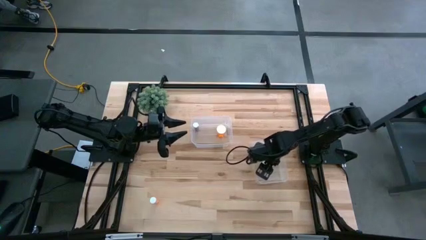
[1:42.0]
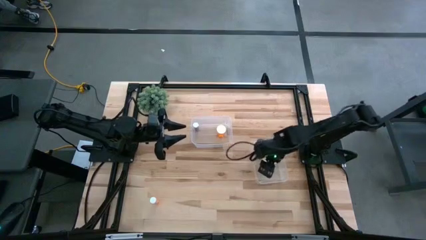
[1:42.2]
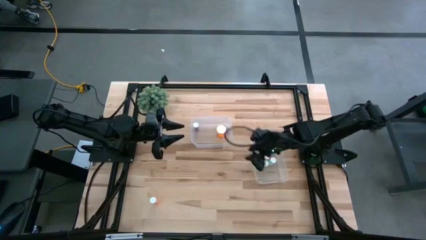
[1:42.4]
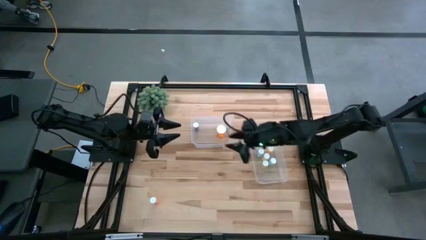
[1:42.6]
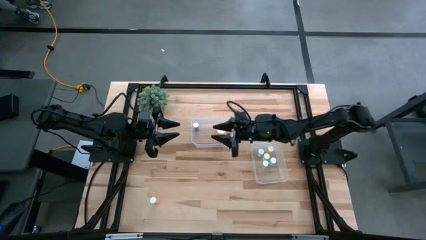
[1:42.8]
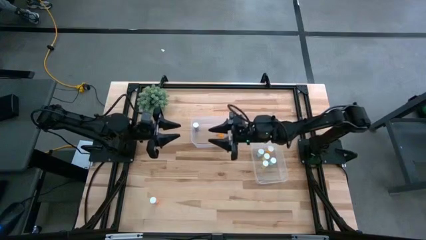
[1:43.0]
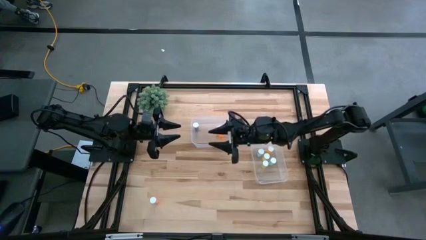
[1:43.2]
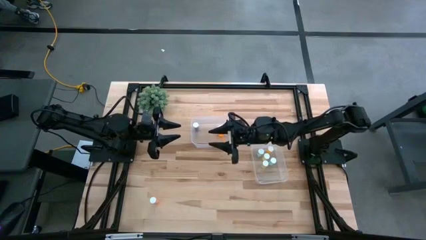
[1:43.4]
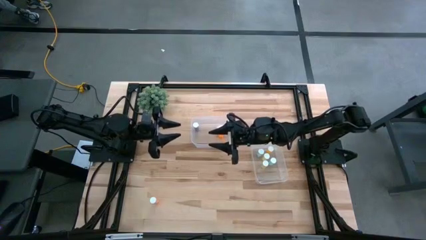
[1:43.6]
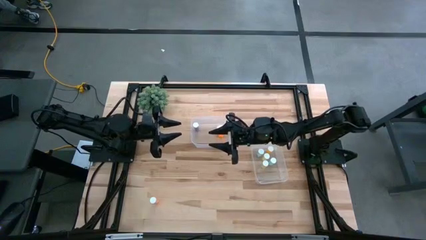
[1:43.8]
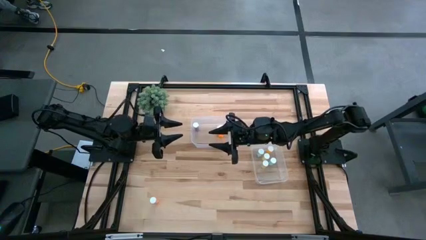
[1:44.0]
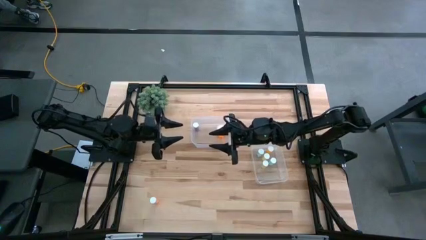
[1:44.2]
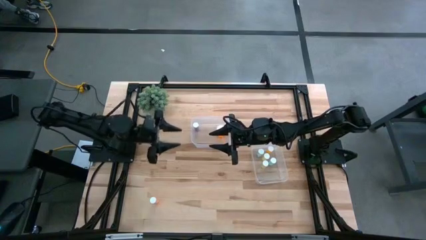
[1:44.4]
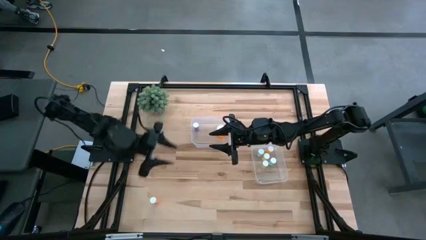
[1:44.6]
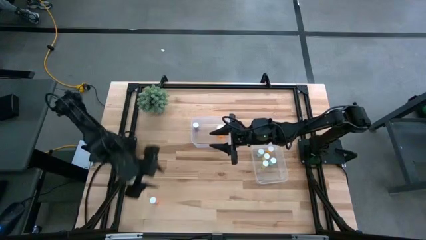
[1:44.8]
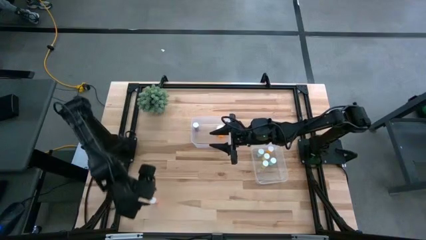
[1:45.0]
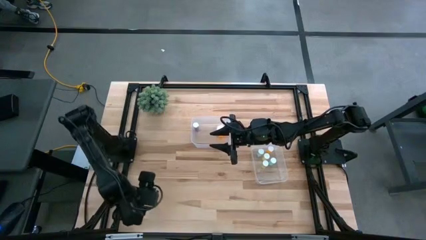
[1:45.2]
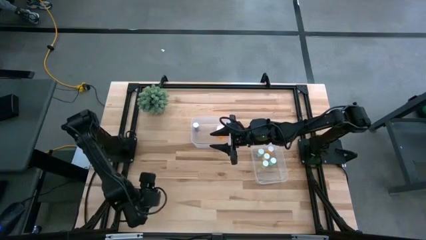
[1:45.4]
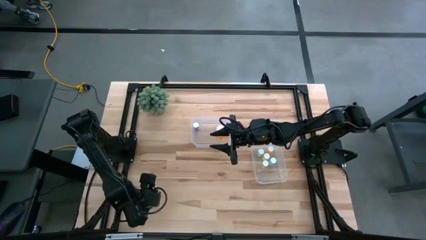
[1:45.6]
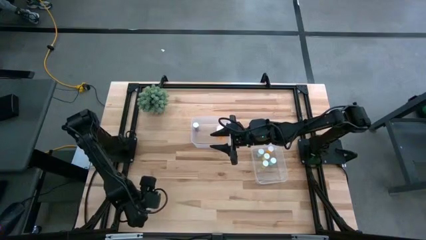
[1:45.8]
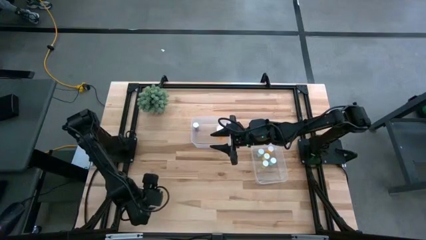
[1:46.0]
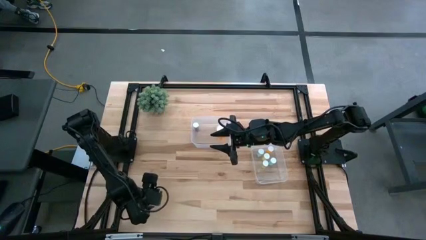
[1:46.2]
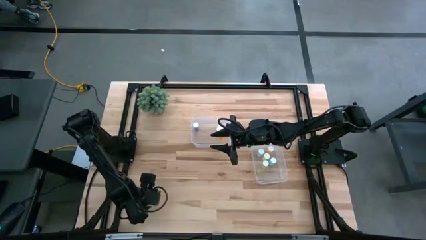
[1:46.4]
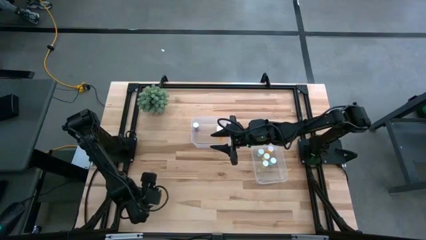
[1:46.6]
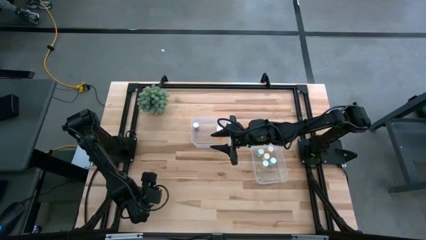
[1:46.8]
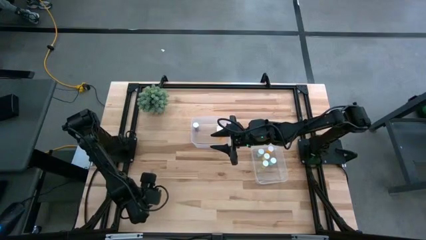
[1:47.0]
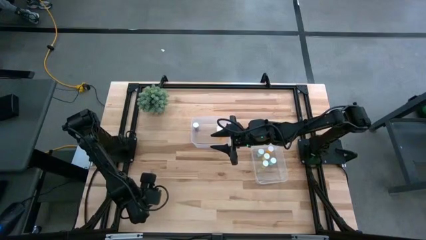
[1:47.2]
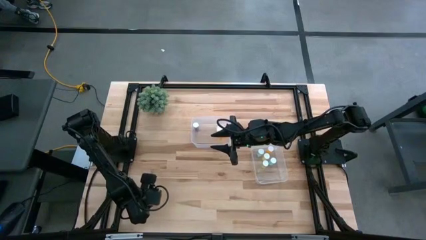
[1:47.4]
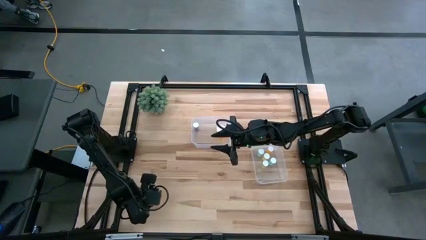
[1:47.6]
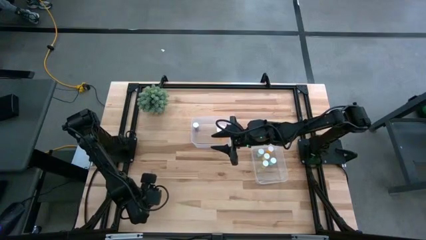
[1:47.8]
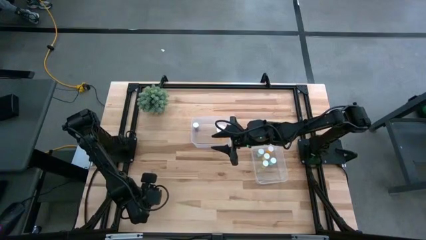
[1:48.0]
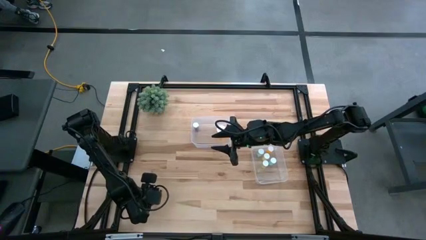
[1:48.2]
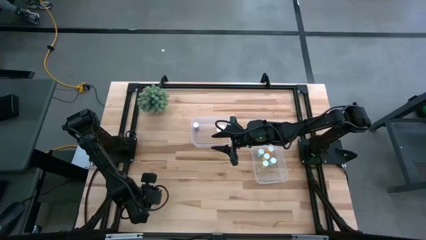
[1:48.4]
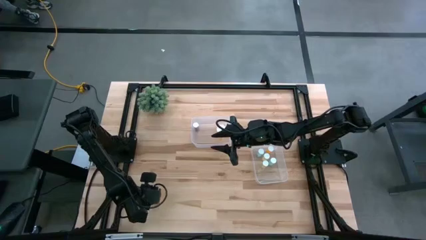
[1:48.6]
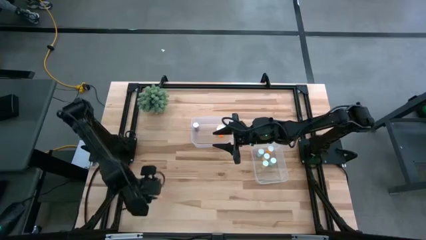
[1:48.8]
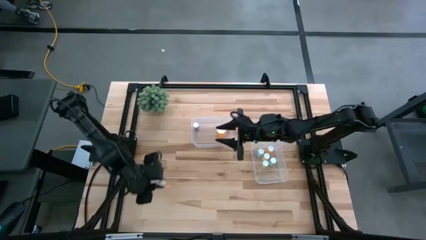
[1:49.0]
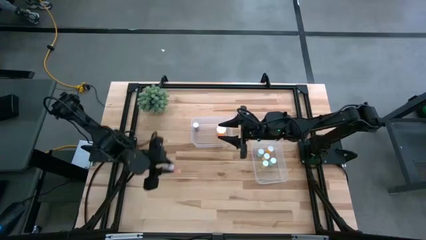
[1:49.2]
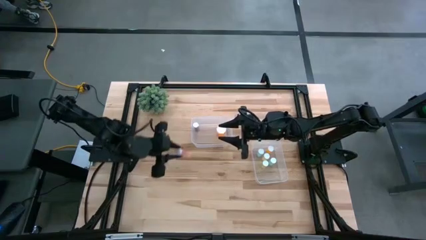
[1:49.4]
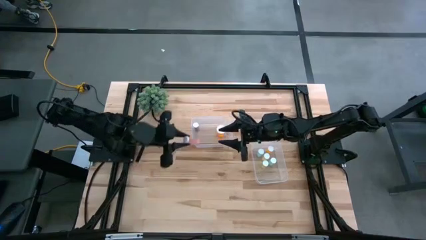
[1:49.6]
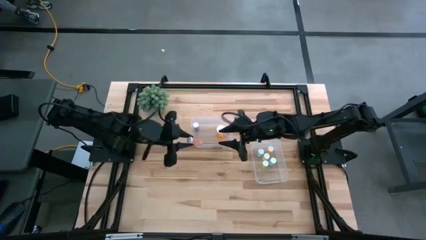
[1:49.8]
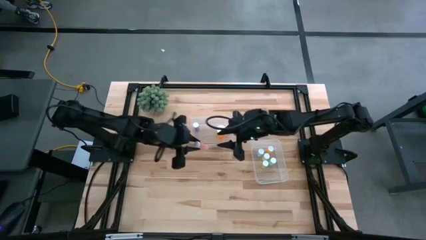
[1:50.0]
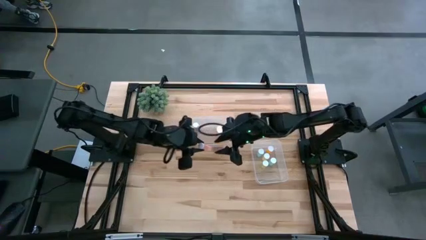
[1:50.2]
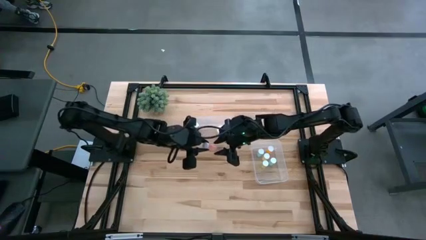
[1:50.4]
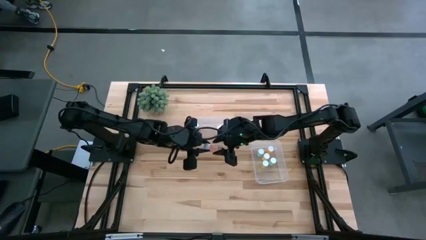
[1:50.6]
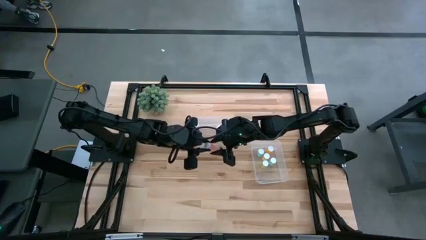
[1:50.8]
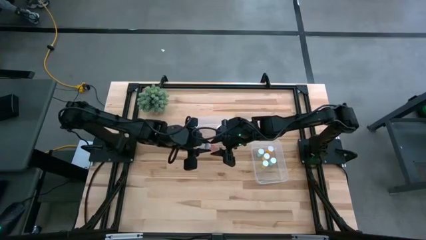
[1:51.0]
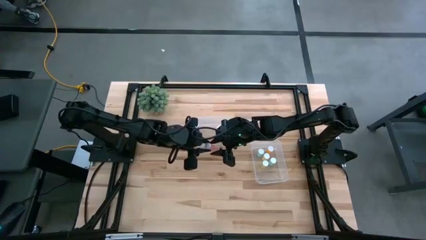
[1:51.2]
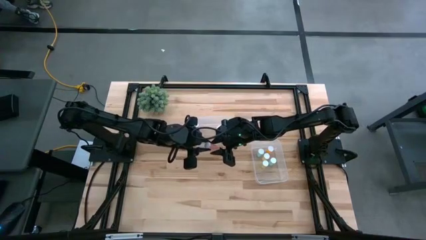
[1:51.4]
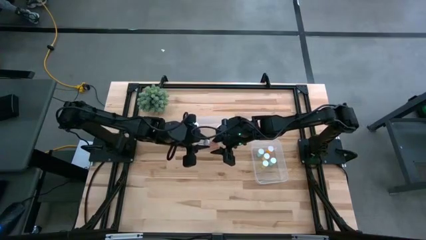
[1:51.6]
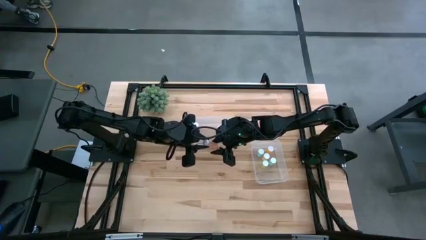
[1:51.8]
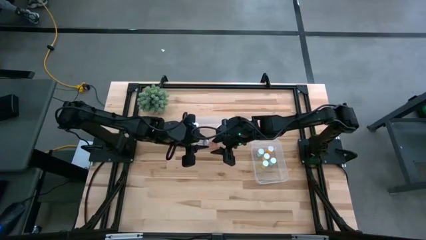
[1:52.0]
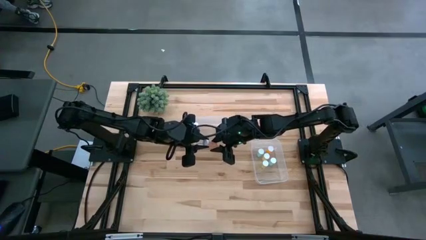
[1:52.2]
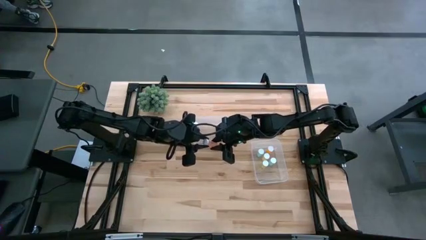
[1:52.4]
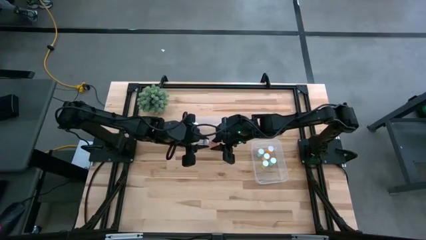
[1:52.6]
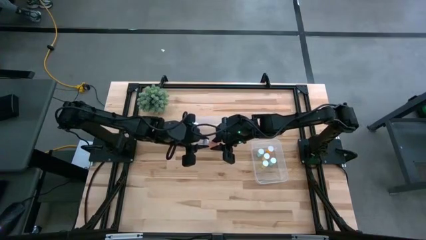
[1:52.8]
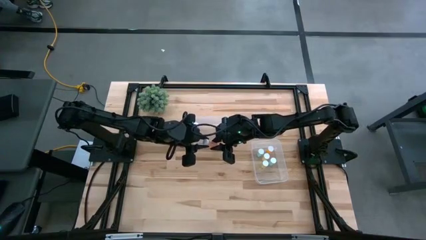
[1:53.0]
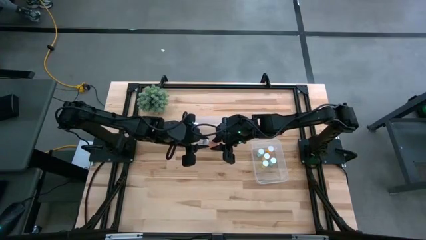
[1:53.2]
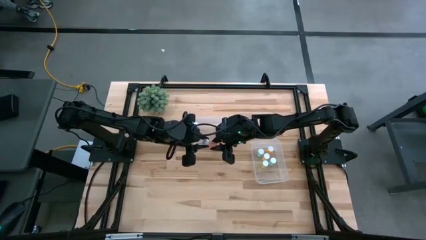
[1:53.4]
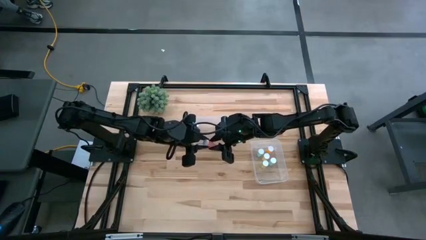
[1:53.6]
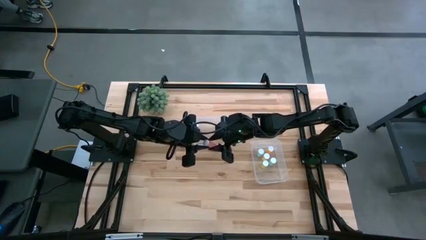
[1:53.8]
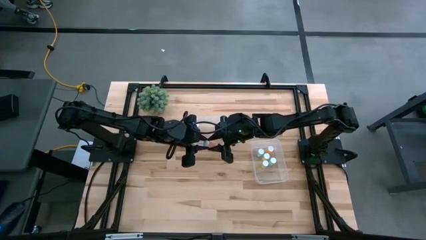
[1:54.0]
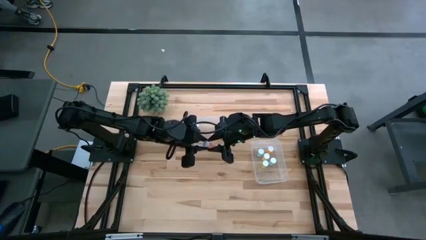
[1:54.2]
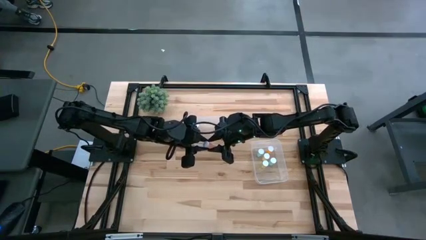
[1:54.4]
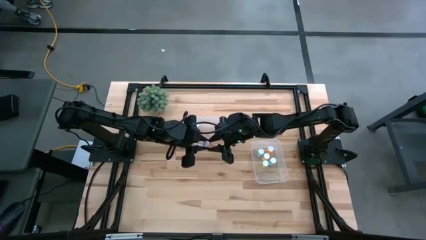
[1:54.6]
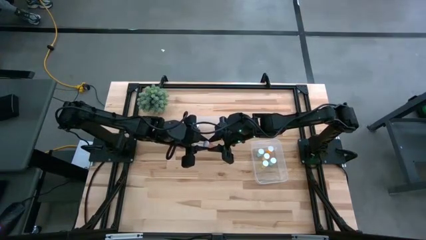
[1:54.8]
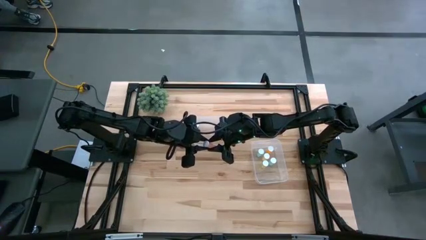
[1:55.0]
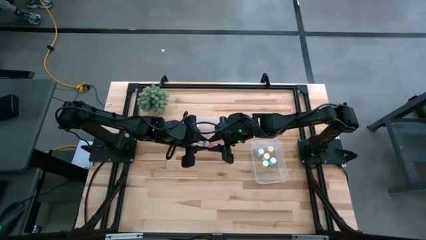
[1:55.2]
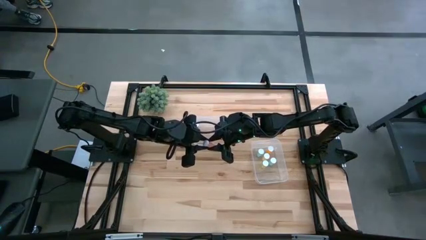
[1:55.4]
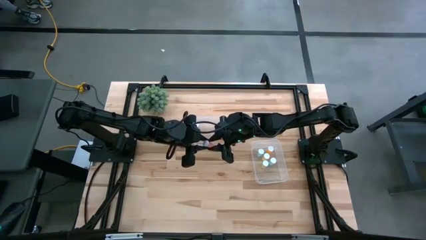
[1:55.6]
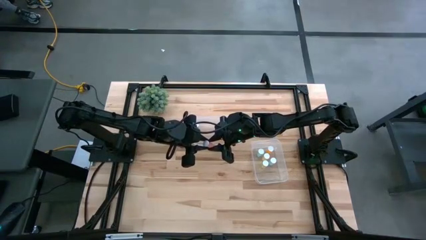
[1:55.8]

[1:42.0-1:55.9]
Task: Pick and place medicine bottles into bin by pill shape (circle, oval)
Put the pink tablet bottle into the bottom transparent bin
